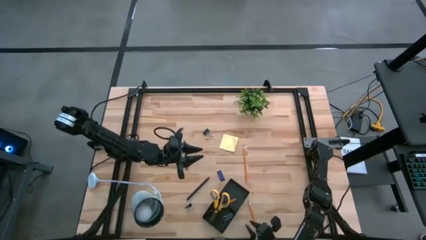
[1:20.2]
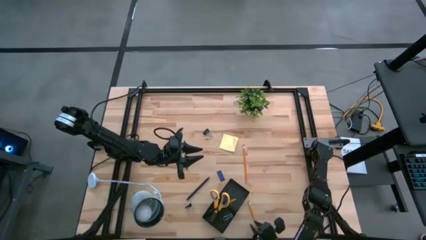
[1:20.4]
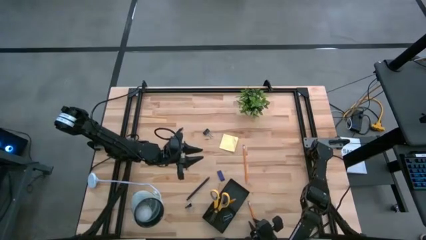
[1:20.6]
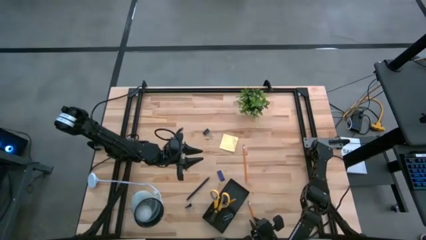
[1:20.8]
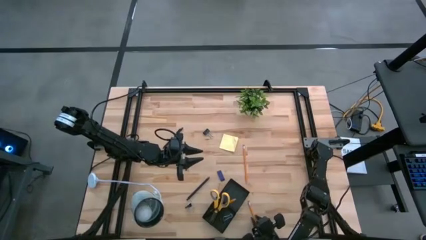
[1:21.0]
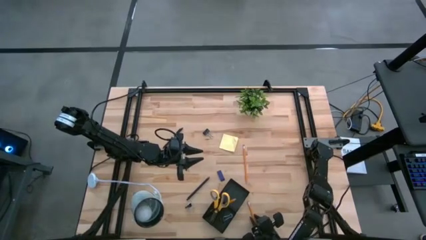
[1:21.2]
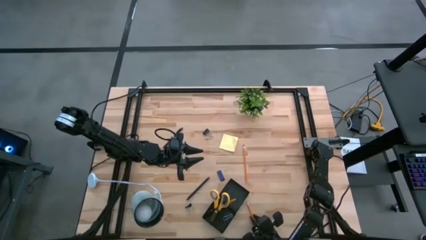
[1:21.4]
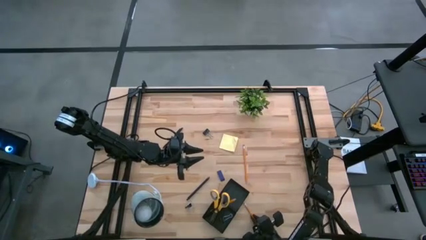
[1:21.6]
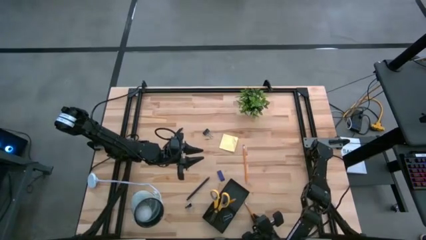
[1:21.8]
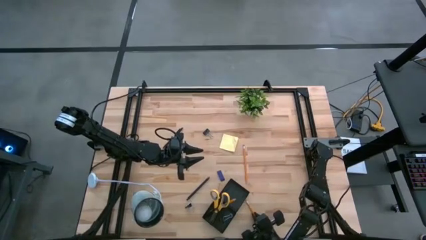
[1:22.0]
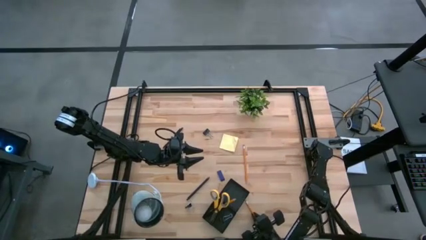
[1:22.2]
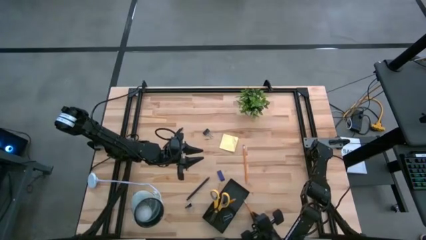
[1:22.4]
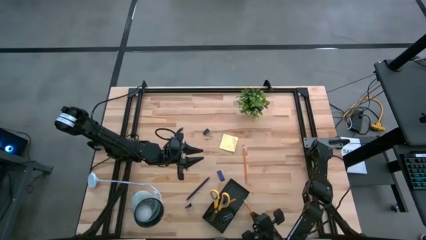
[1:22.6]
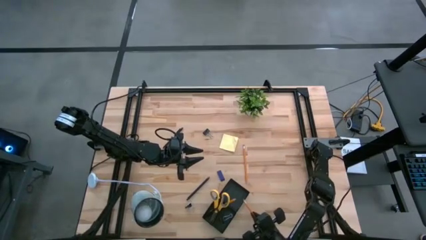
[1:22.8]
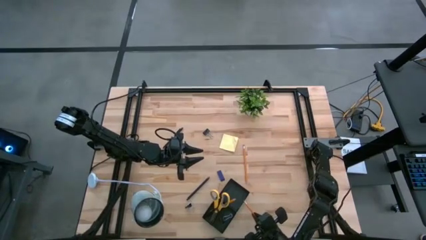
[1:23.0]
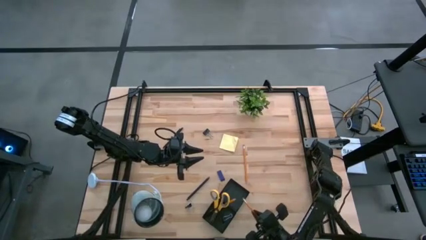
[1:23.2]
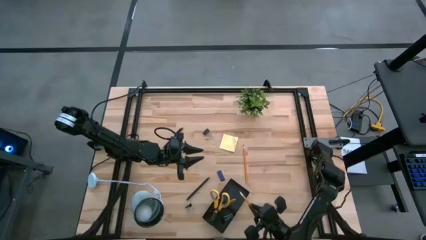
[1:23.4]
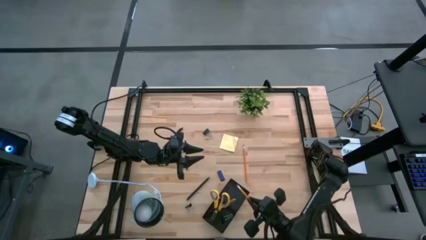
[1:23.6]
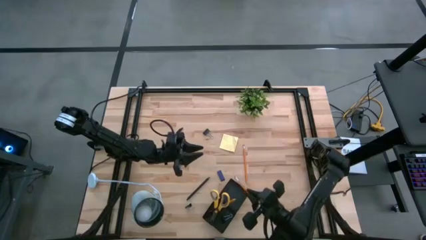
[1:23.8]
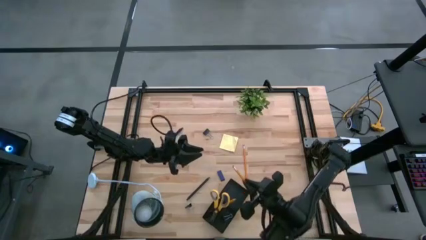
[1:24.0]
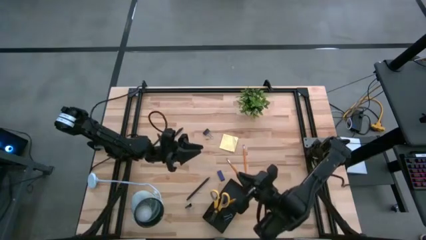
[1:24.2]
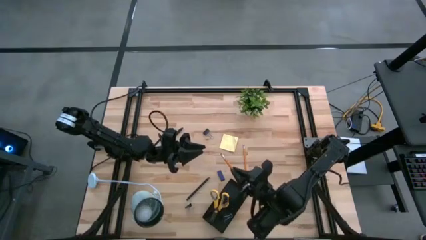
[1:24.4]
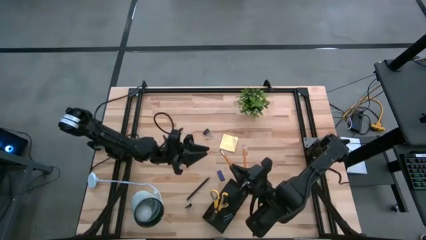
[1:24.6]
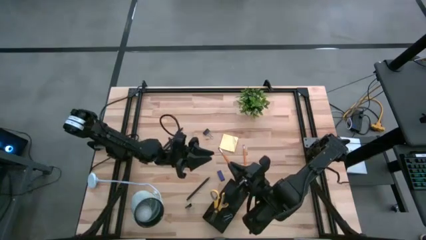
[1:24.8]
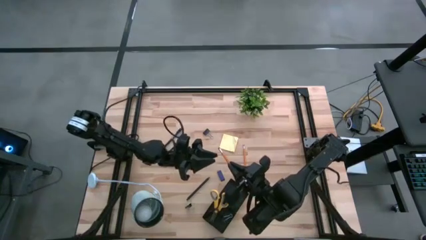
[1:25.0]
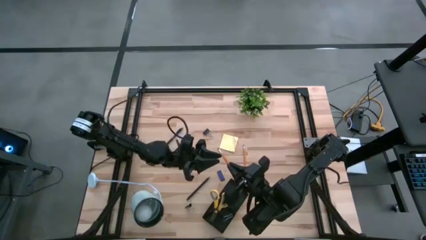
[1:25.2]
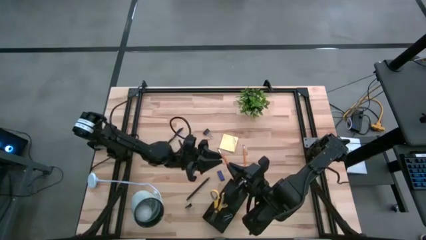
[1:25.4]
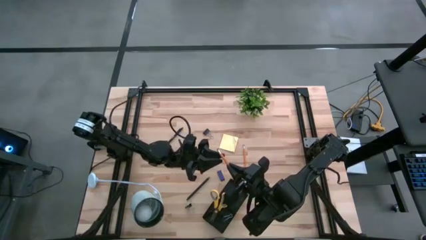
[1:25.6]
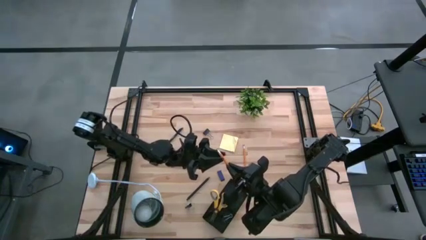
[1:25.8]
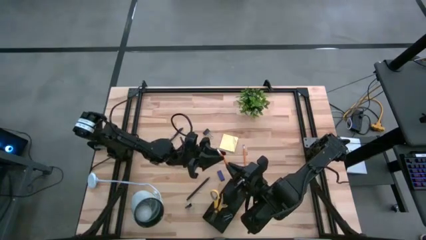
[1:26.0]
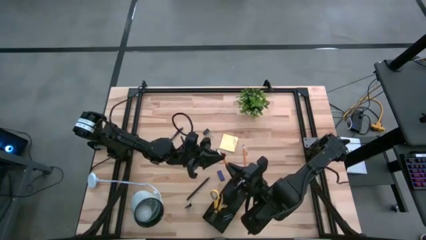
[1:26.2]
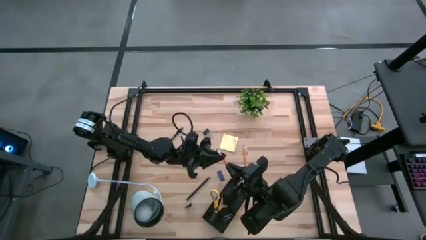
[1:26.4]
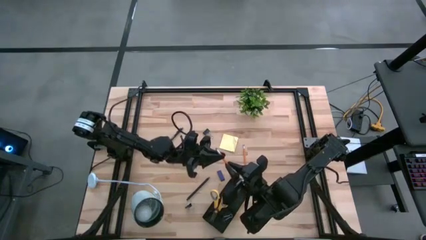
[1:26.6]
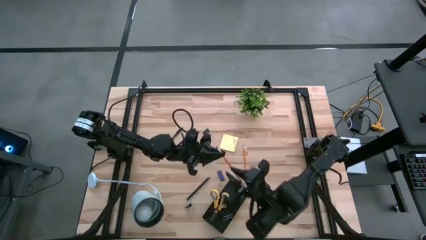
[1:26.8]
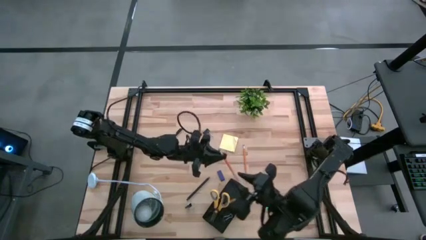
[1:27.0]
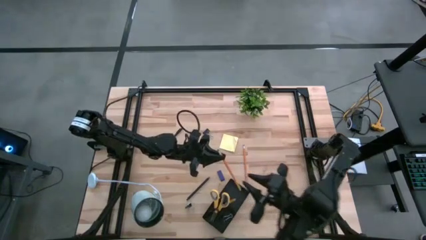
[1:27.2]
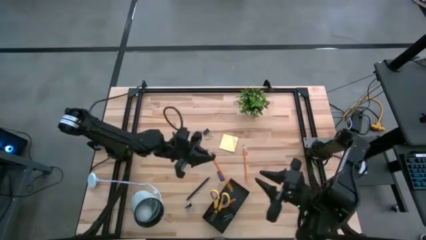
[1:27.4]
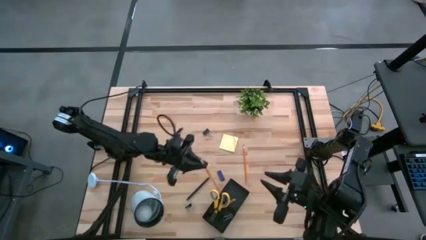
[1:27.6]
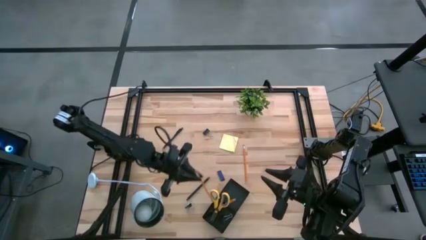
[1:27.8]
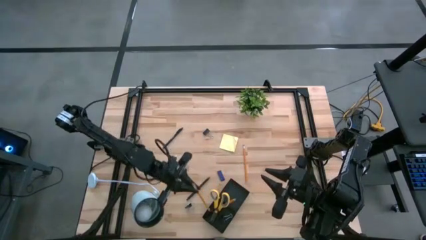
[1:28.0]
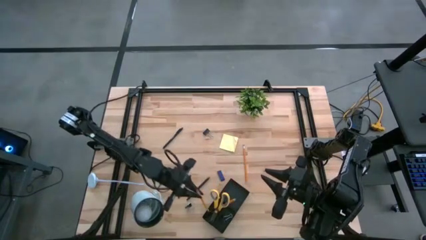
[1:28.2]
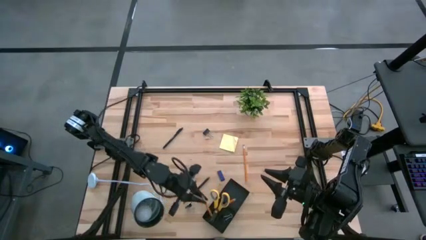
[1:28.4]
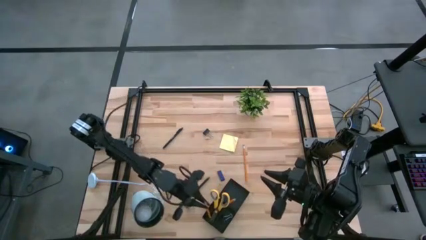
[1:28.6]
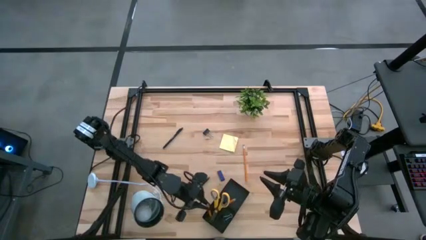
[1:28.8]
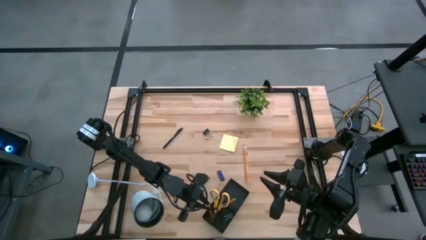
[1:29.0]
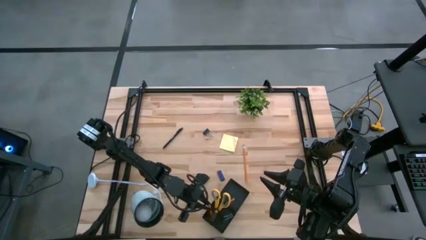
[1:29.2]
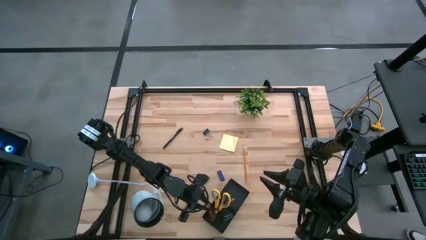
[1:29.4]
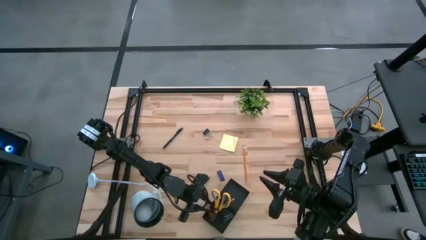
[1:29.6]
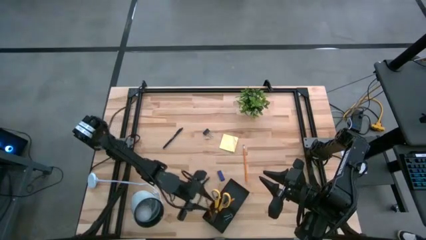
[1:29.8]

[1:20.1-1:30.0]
Task: Pick and place office supplies into organizer
Put the left pencil into the desk organizer

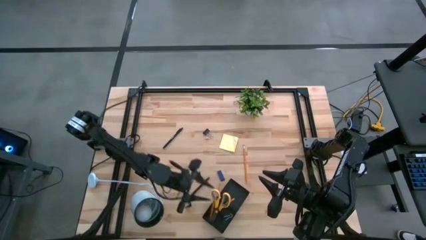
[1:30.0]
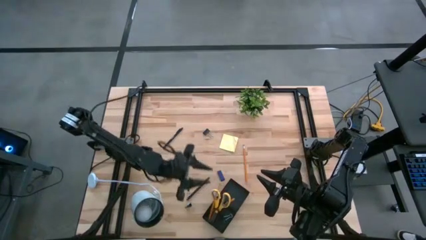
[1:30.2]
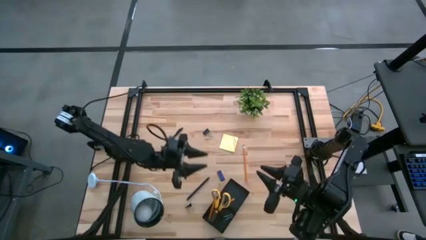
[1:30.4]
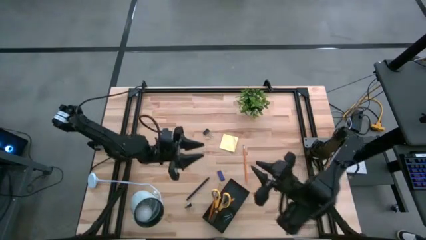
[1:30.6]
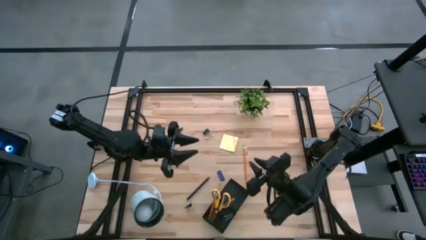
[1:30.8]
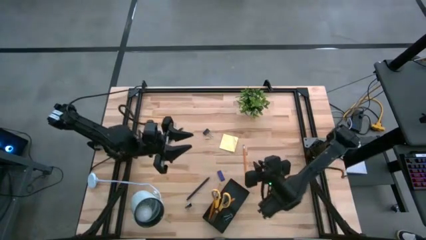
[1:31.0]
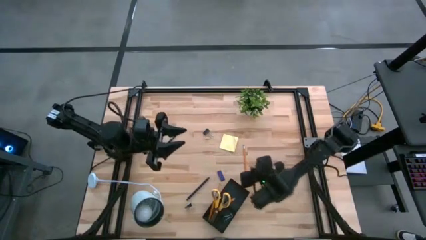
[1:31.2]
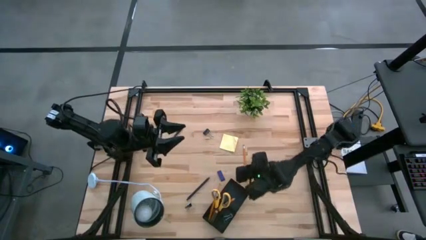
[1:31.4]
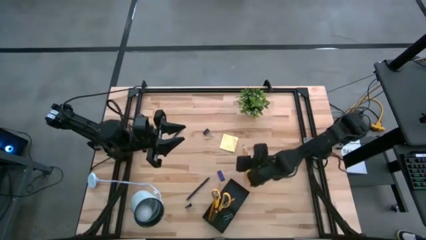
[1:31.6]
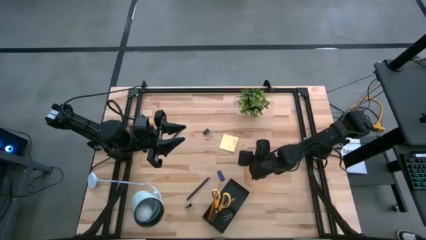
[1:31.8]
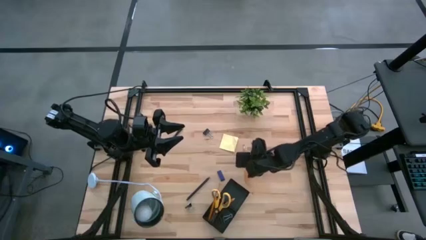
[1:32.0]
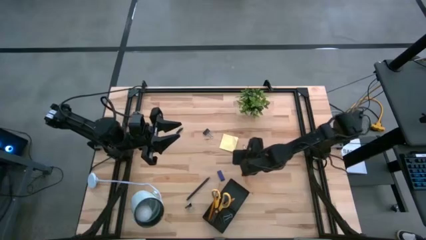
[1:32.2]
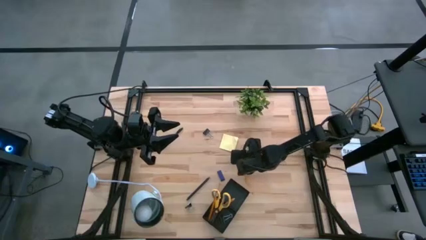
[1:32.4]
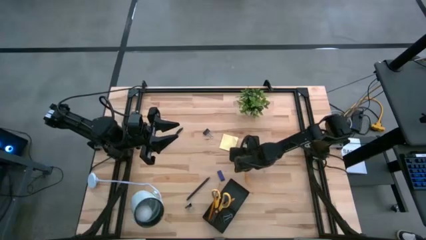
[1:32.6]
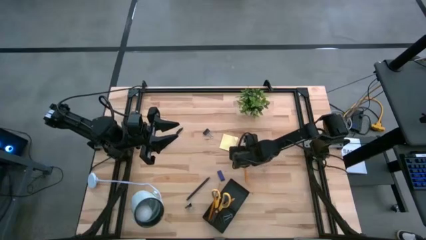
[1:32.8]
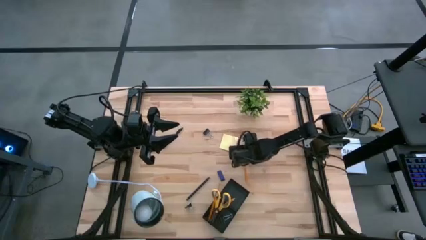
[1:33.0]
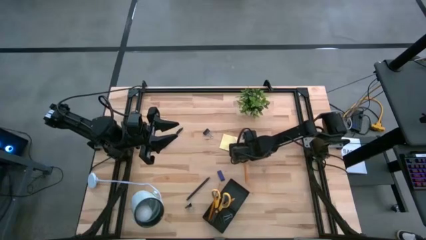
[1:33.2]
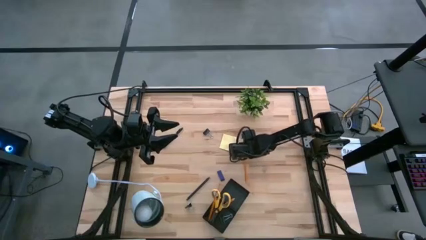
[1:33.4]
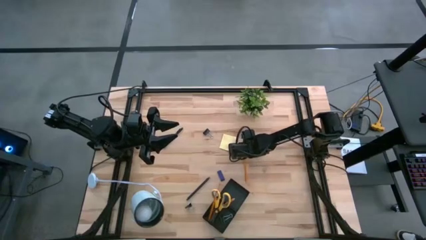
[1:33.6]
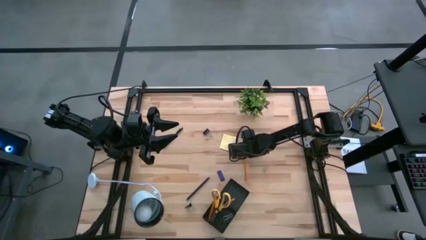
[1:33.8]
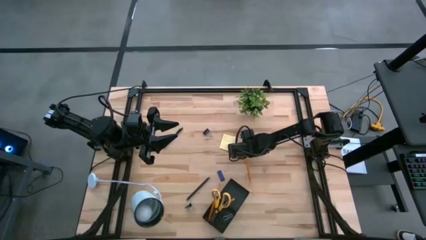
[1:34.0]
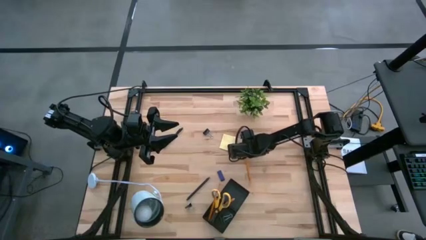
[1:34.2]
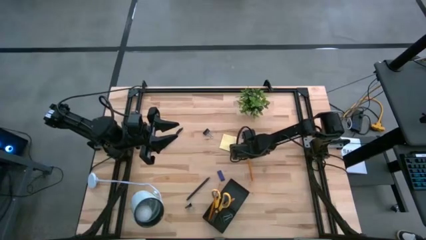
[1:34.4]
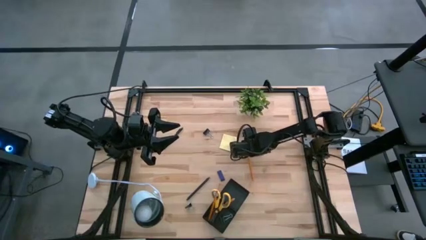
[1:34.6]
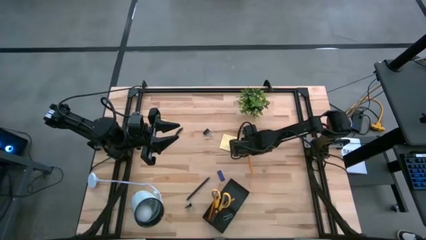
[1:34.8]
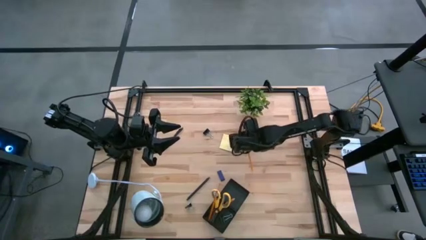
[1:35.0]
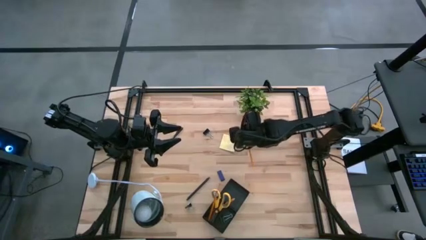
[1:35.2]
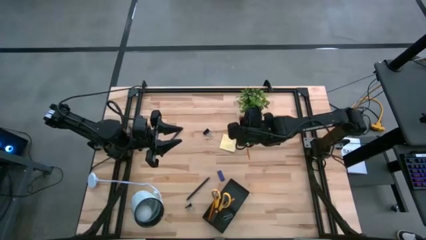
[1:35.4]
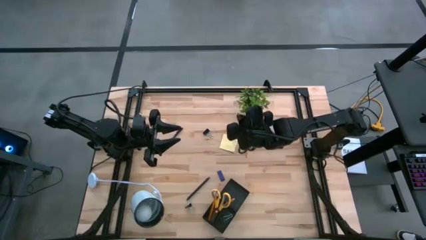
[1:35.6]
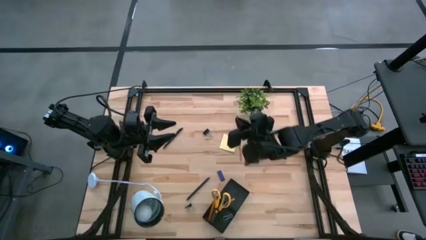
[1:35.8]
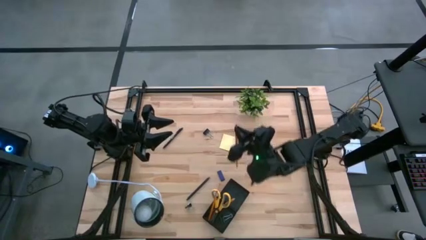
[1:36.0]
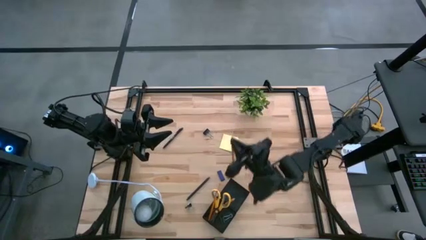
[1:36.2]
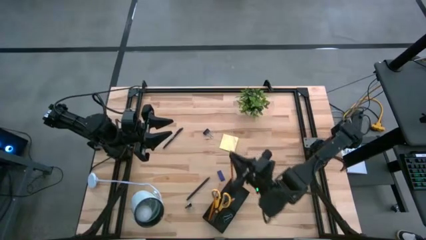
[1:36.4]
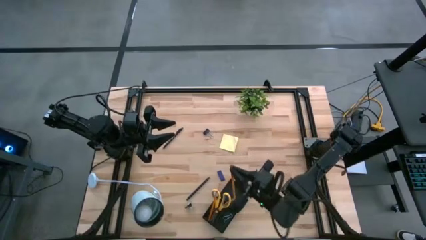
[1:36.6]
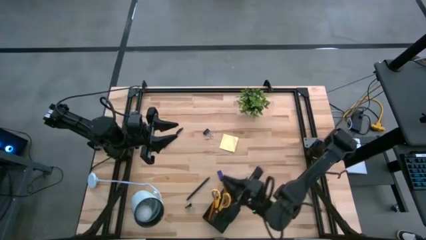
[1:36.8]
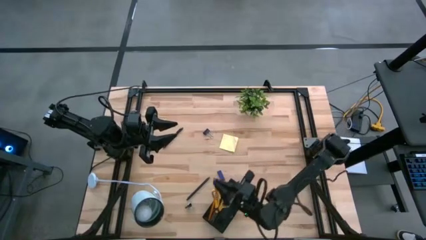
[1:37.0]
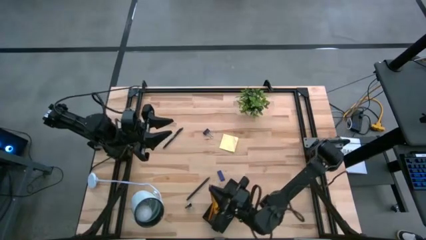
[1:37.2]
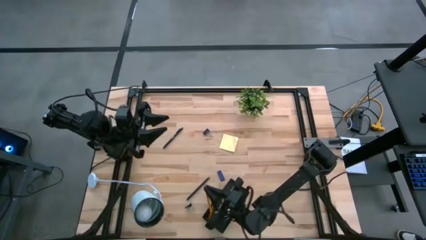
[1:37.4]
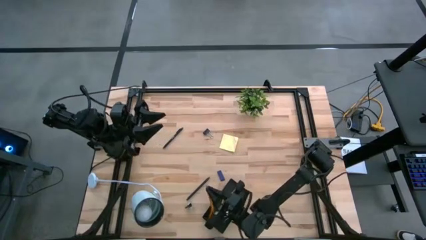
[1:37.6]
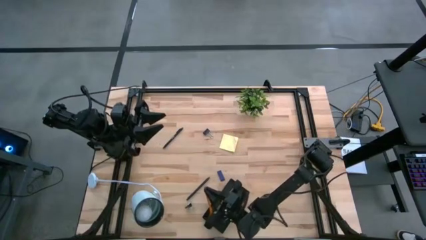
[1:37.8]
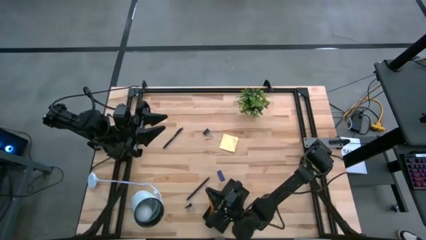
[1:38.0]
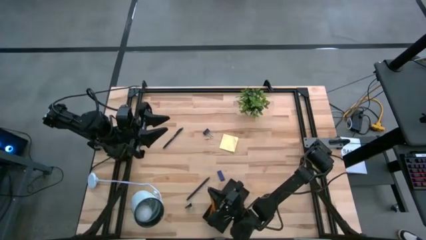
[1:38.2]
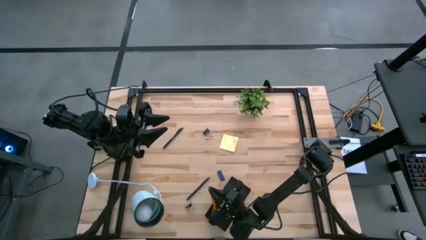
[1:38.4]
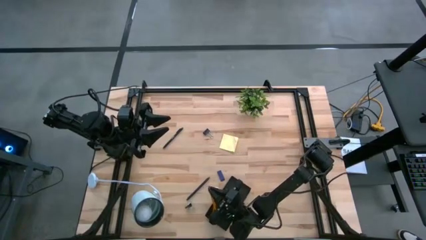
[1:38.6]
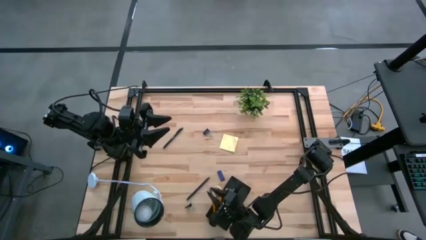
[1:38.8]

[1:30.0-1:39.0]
Put the pencil into the desk organizer
